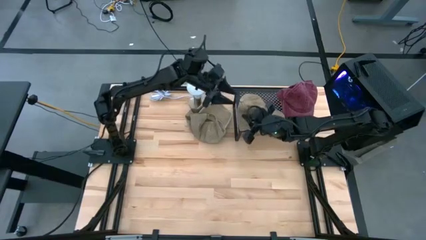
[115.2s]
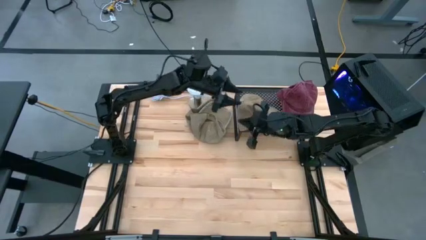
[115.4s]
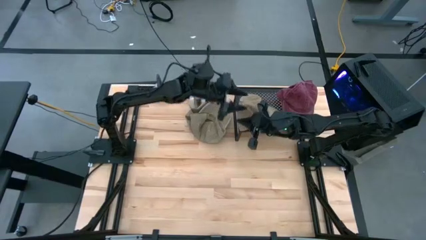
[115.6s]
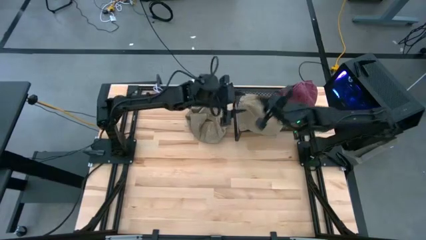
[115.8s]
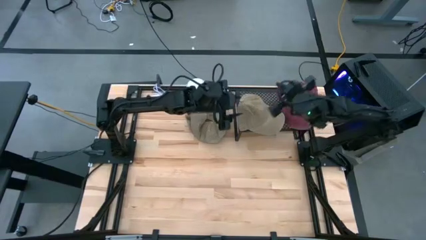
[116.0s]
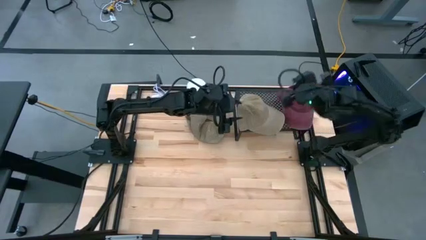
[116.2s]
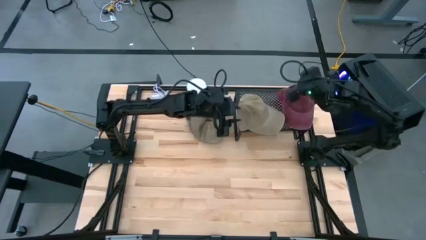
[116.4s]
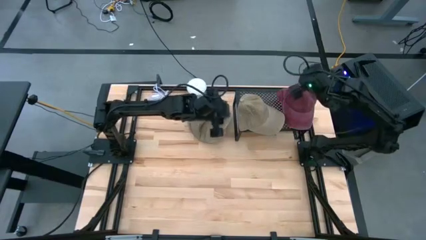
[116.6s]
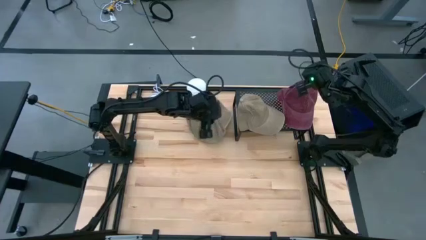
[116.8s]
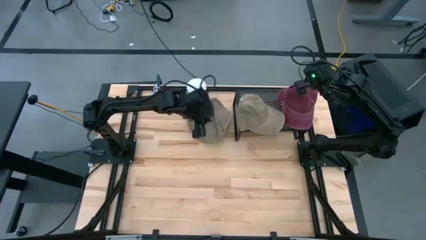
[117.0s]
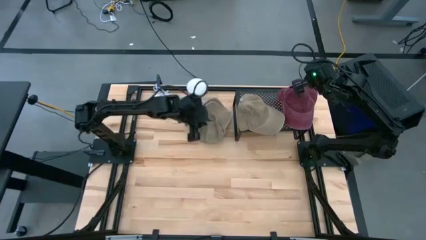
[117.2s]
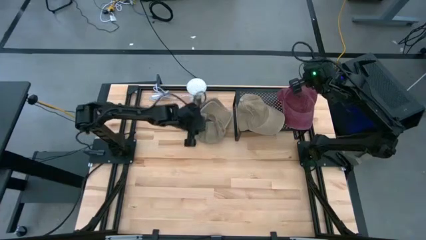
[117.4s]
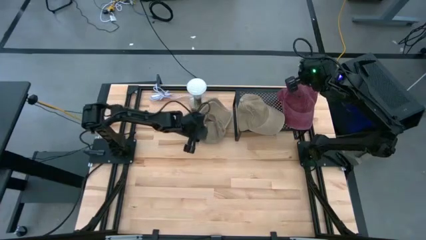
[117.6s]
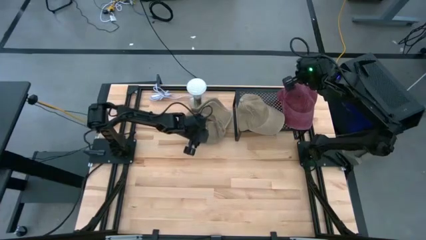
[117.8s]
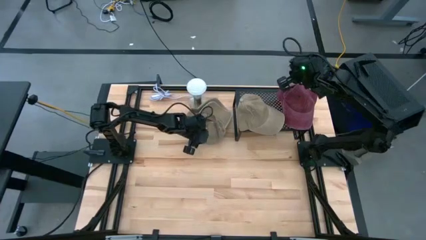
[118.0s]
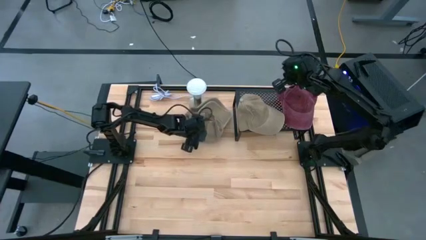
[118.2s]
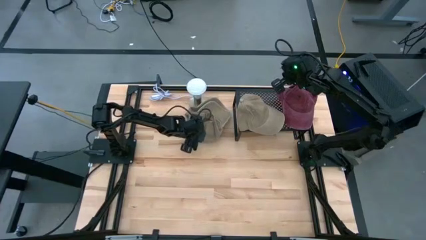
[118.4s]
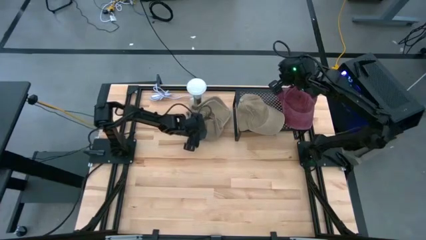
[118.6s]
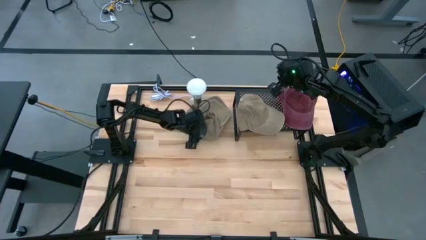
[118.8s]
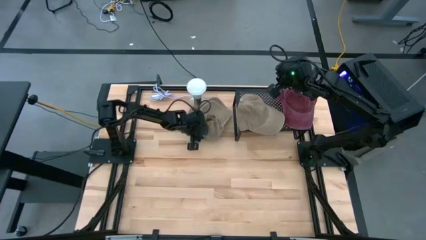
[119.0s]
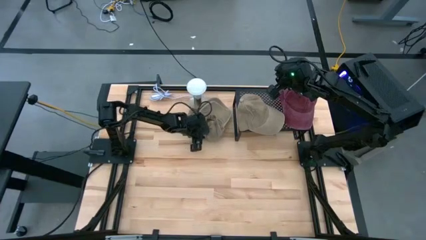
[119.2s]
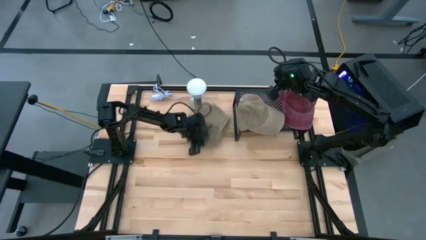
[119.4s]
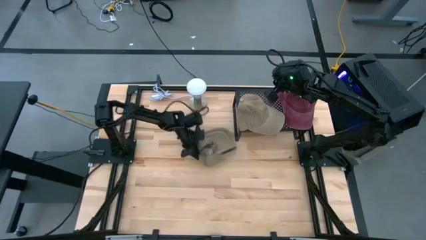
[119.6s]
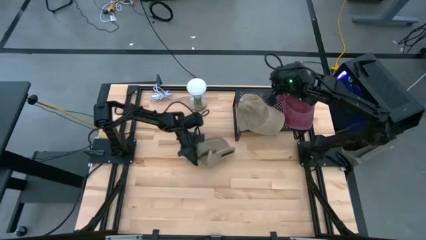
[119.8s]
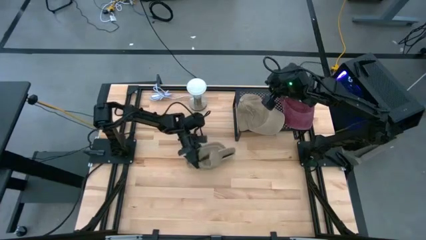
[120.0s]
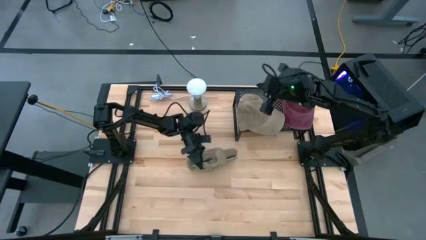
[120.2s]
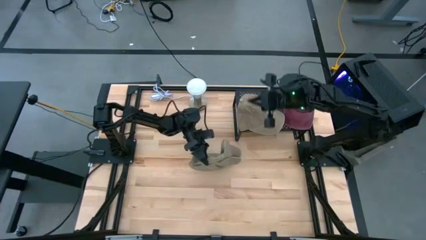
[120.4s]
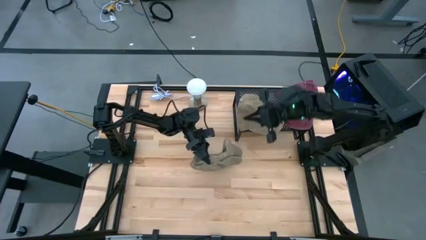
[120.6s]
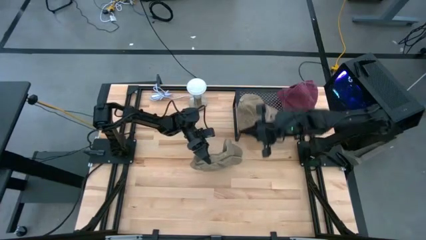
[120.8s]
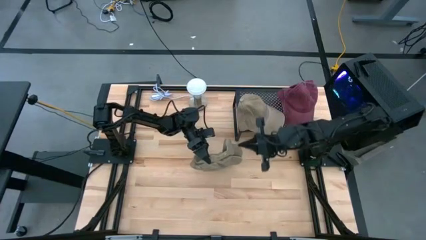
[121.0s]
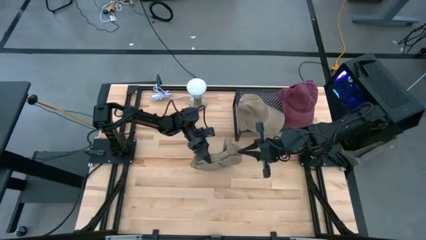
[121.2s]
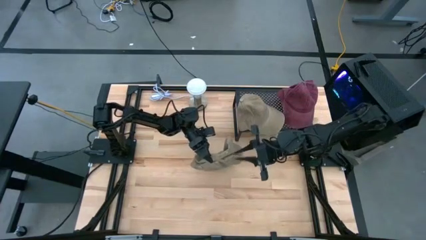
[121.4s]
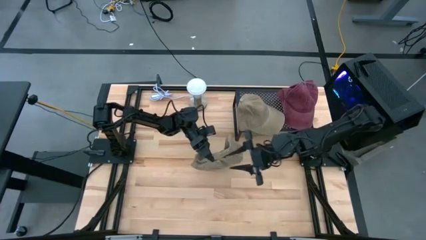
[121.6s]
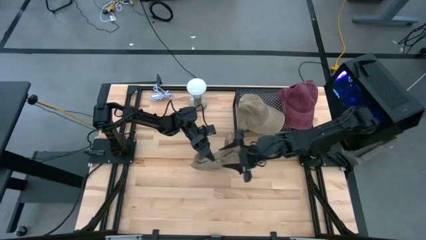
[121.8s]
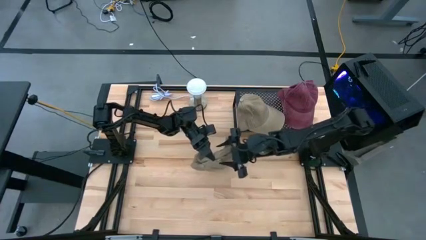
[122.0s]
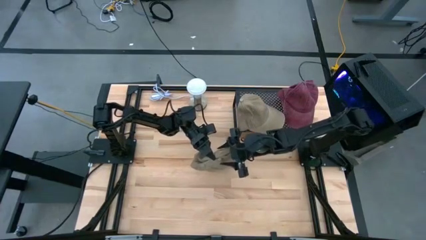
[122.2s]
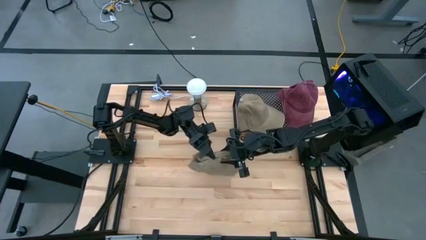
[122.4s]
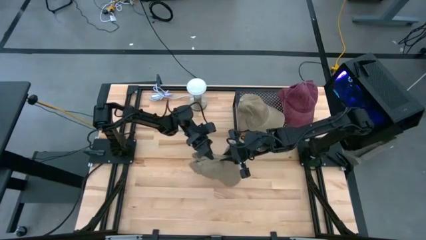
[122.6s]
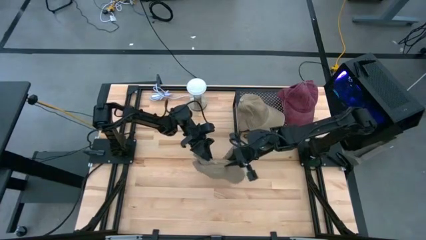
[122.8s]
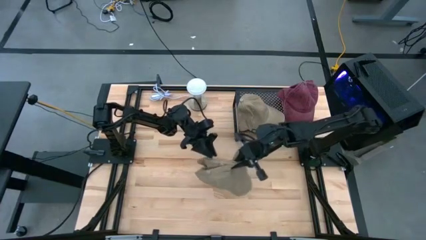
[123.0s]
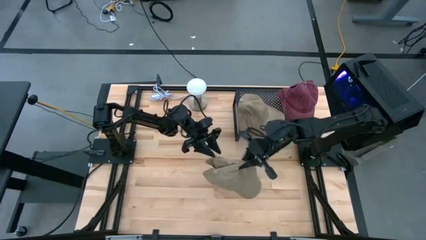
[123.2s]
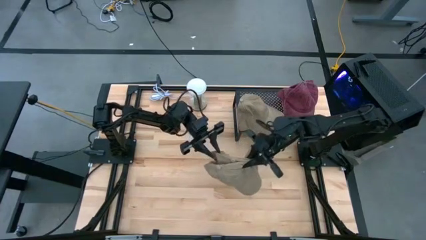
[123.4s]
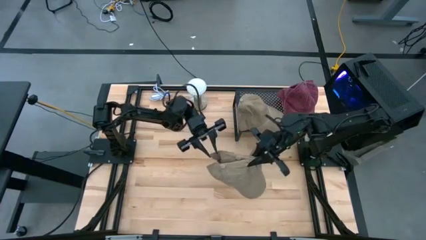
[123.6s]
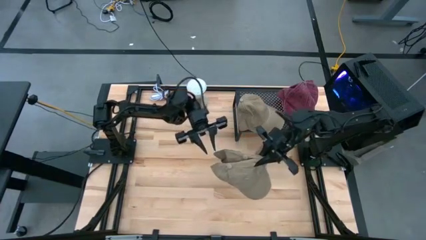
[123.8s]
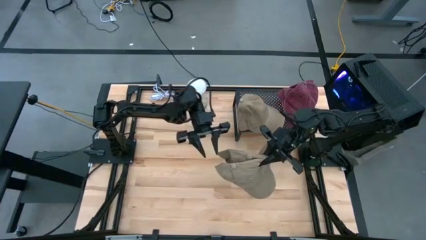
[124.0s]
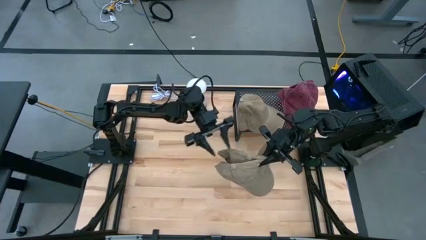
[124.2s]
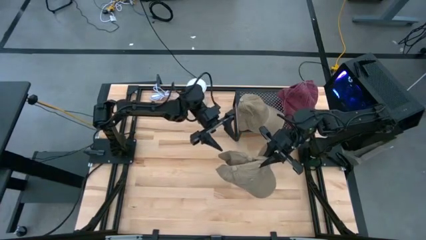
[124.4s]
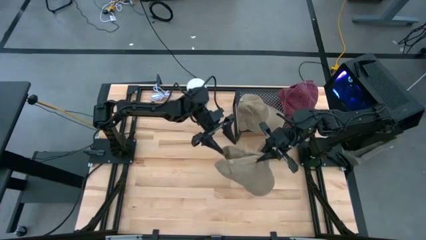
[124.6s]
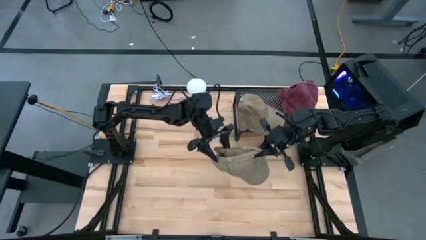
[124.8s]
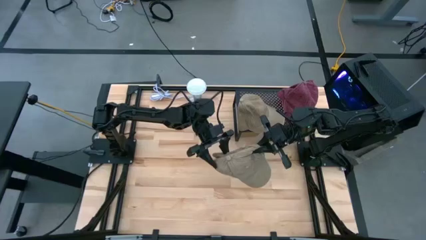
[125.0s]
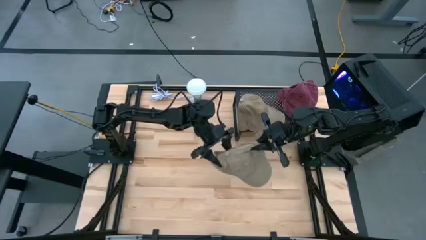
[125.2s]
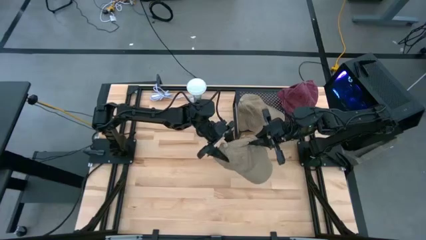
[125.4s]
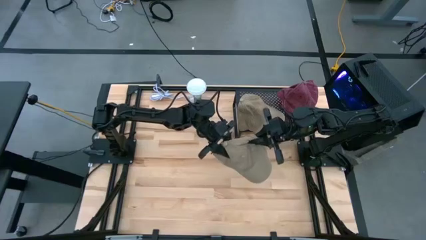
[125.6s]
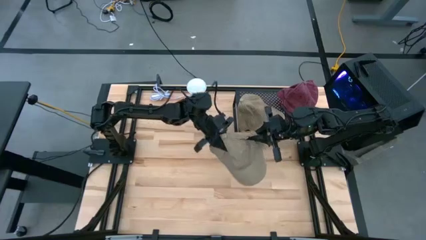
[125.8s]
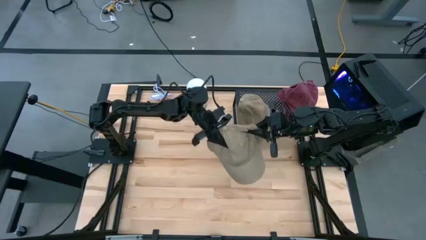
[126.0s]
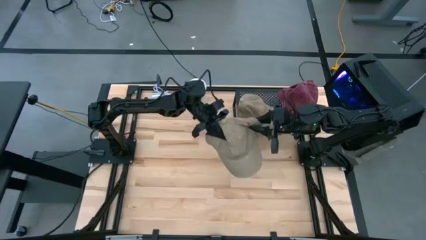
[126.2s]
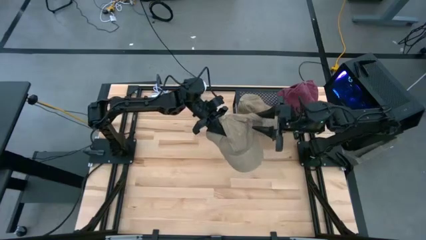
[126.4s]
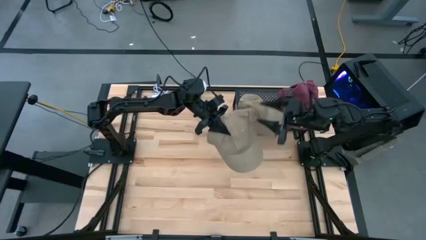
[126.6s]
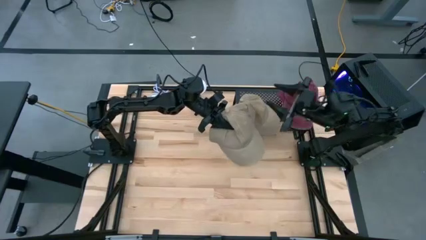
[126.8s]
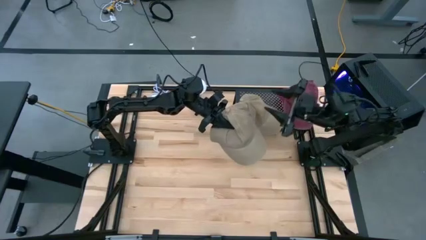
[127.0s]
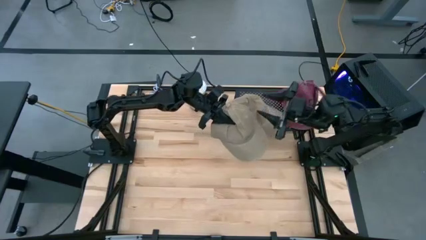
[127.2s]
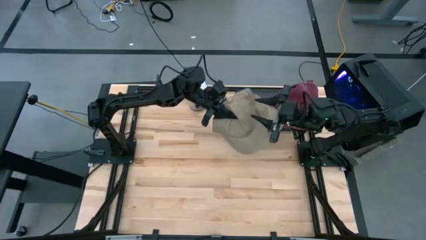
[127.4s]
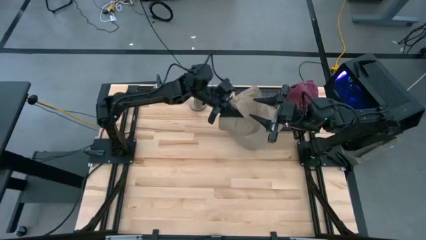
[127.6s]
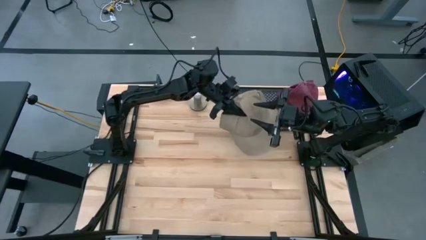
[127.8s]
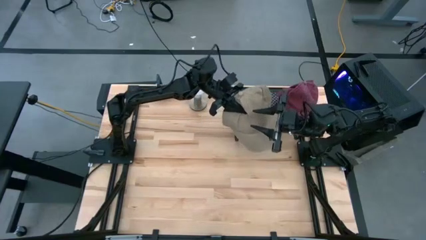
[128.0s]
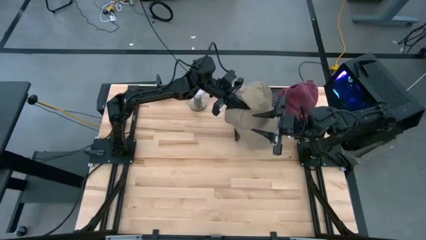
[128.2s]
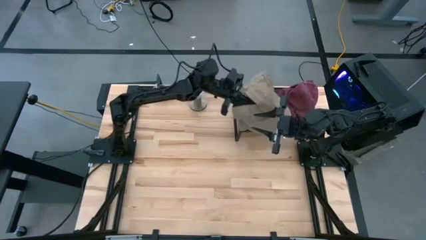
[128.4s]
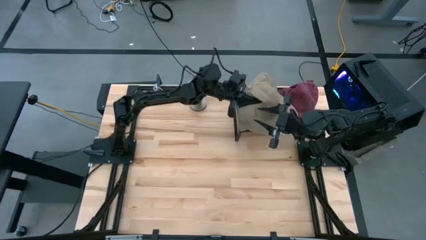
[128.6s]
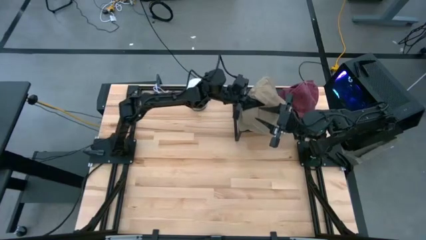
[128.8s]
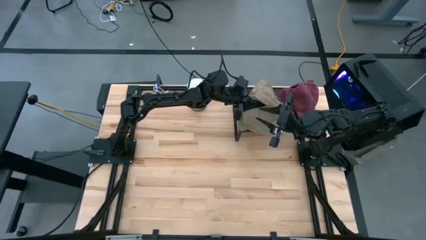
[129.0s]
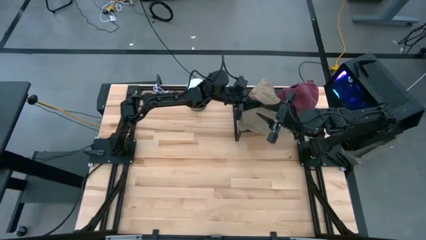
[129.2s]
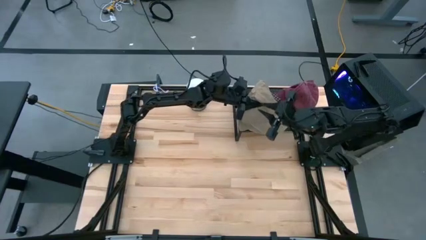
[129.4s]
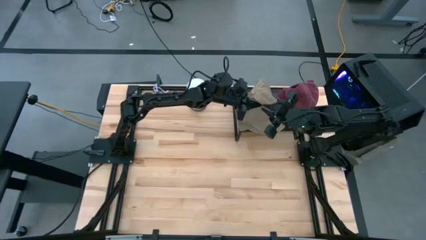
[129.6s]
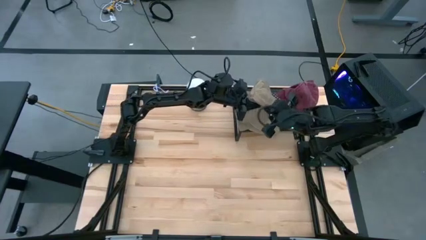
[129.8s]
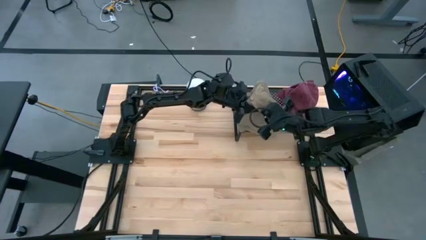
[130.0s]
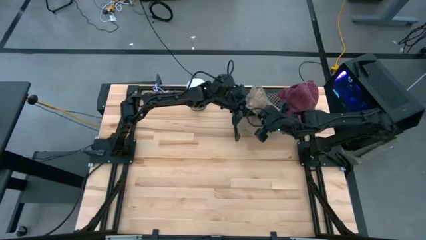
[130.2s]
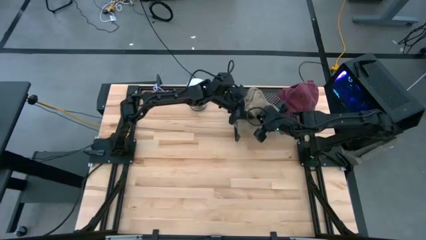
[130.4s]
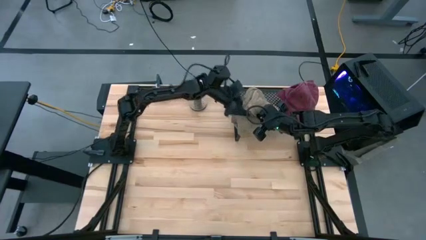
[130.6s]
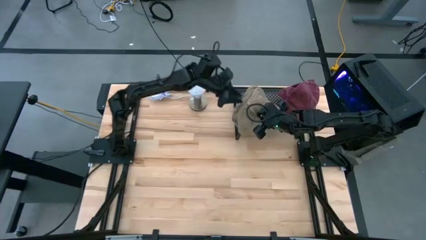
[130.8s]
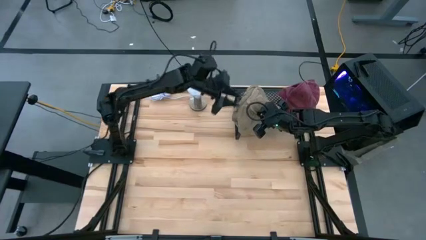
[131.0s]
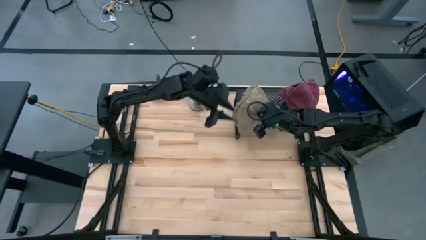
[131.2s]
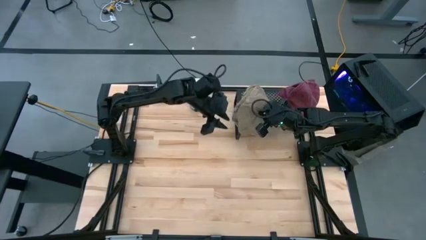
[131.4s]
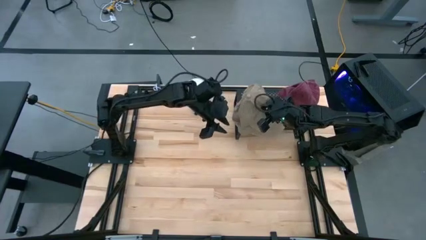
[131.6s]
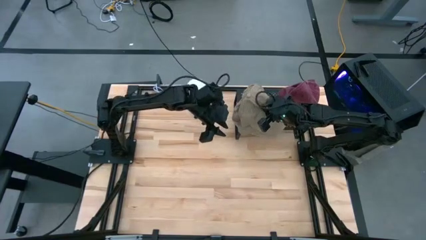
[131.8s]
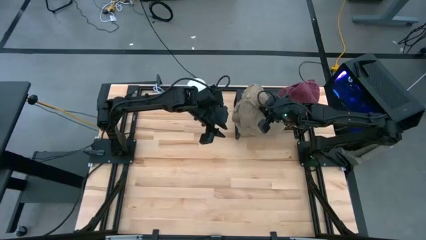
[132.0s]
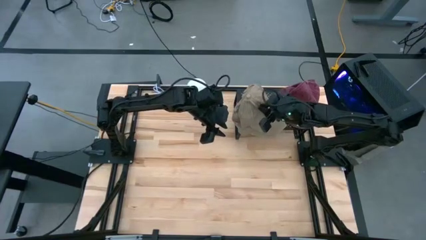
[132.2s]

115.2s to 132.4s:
Task: Pick & Place hat
Stack the stacked brown hat on the brown hat on the black shelf
